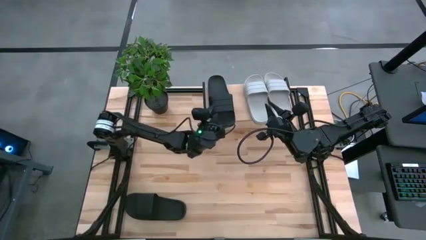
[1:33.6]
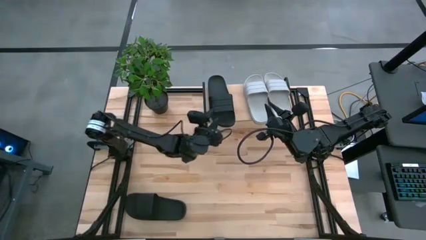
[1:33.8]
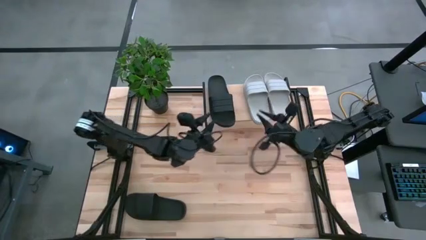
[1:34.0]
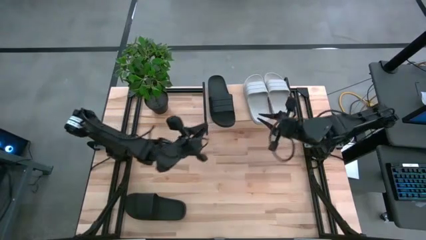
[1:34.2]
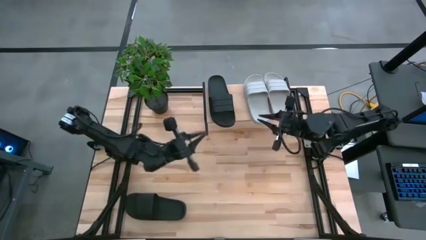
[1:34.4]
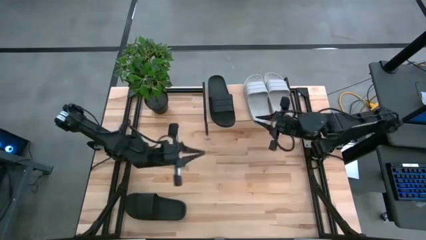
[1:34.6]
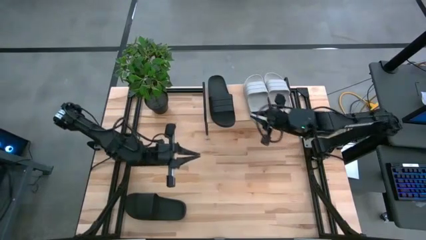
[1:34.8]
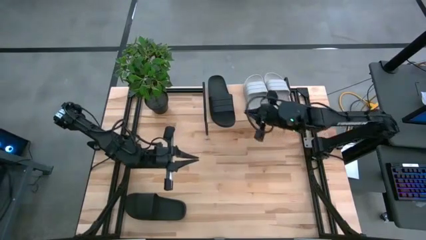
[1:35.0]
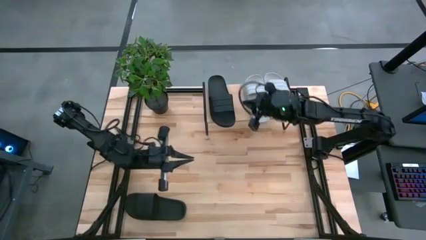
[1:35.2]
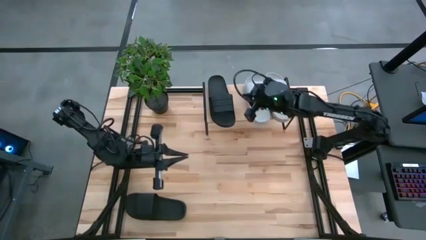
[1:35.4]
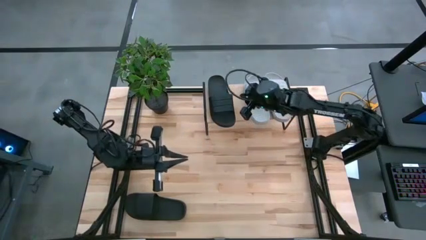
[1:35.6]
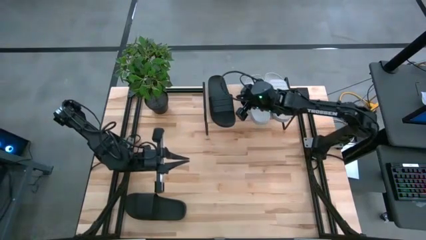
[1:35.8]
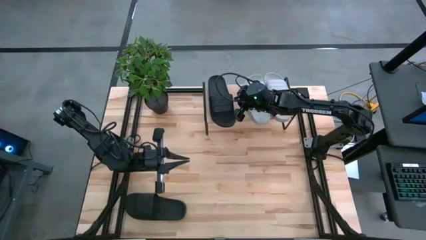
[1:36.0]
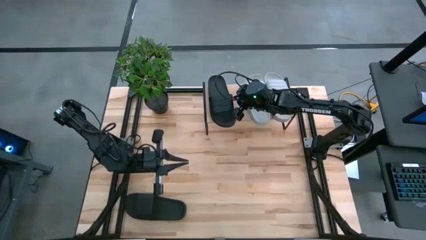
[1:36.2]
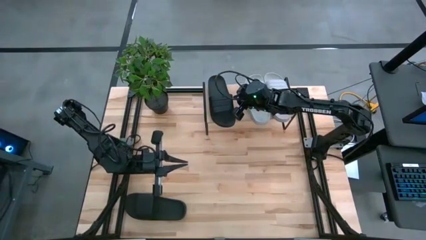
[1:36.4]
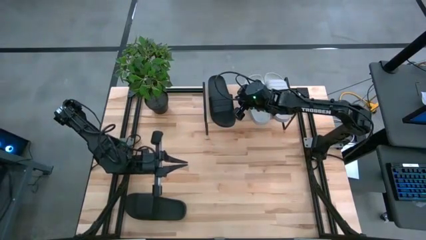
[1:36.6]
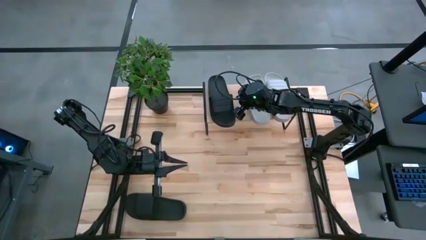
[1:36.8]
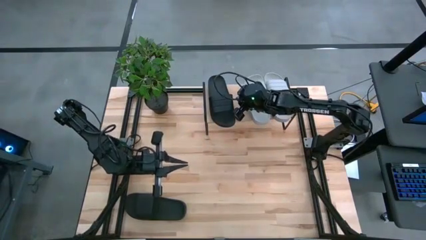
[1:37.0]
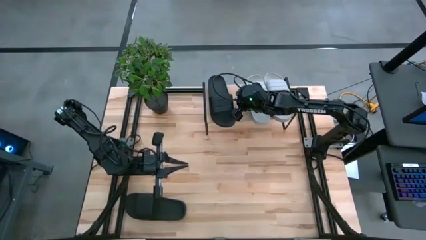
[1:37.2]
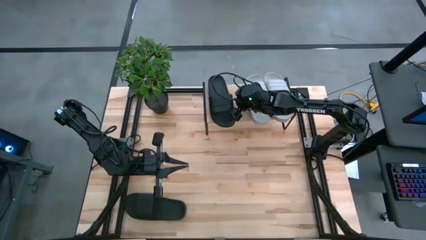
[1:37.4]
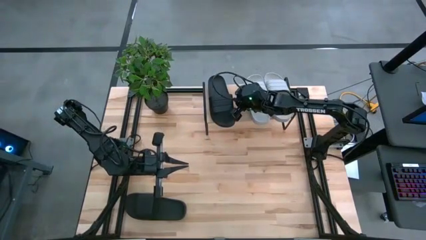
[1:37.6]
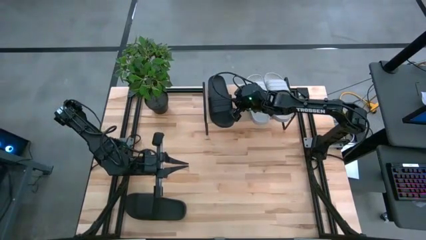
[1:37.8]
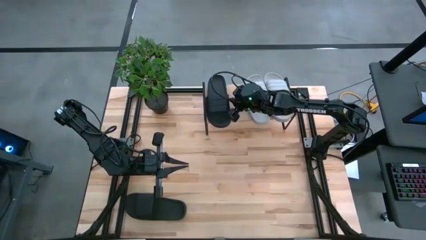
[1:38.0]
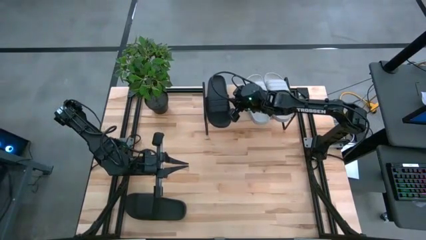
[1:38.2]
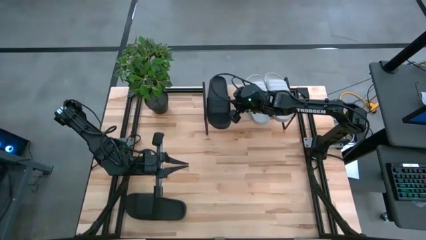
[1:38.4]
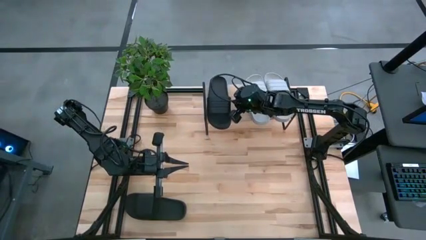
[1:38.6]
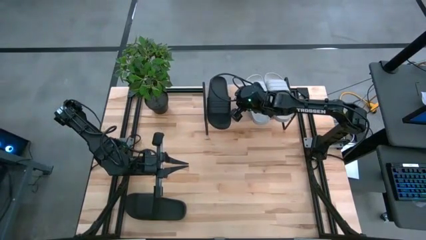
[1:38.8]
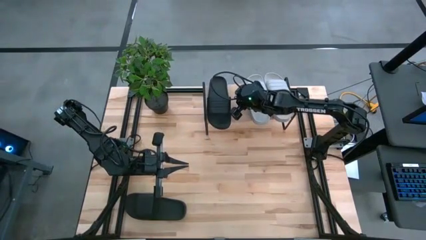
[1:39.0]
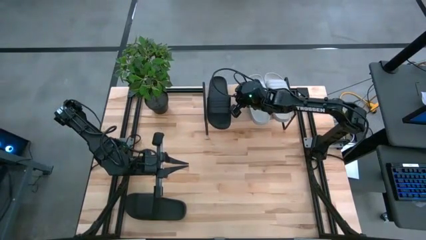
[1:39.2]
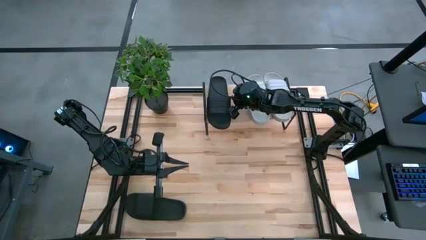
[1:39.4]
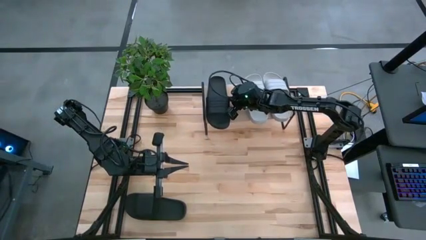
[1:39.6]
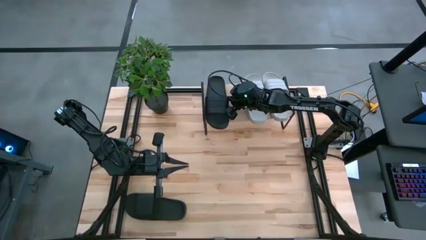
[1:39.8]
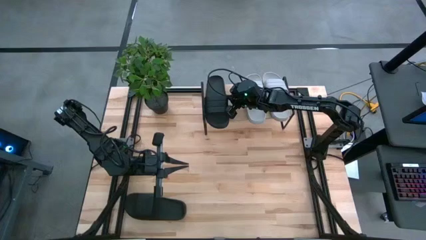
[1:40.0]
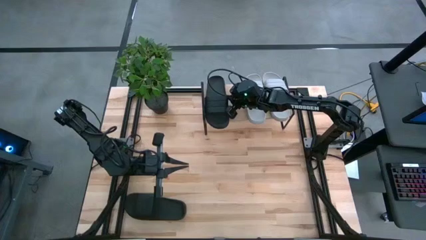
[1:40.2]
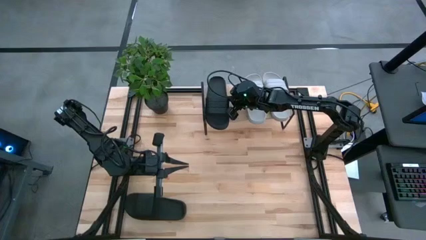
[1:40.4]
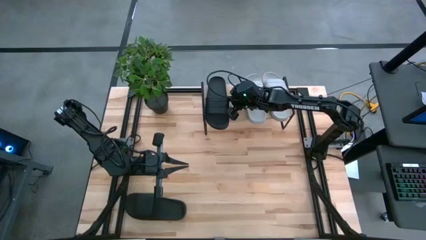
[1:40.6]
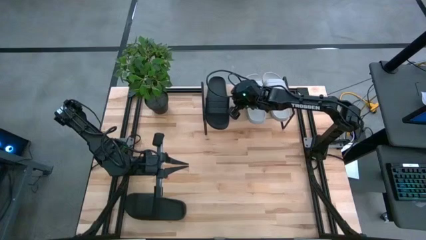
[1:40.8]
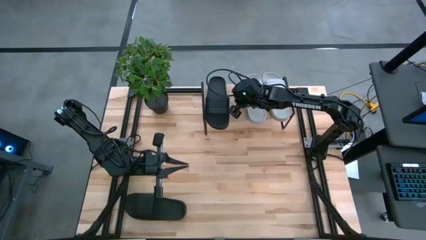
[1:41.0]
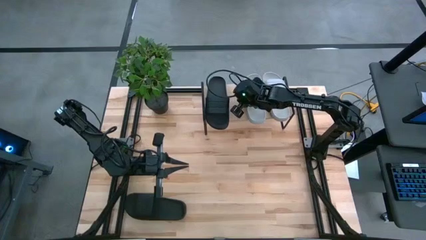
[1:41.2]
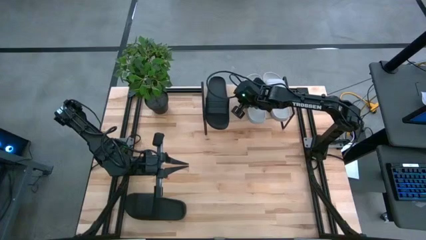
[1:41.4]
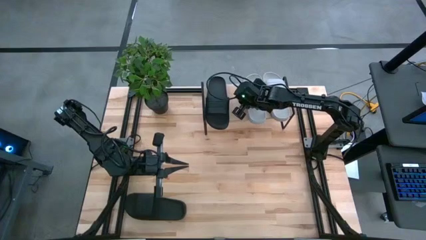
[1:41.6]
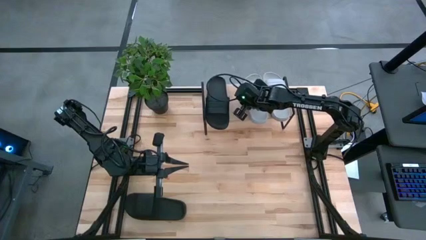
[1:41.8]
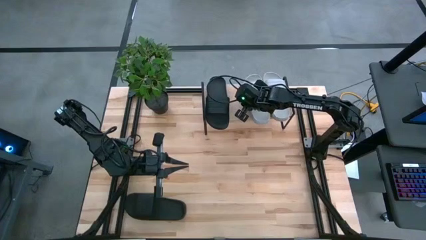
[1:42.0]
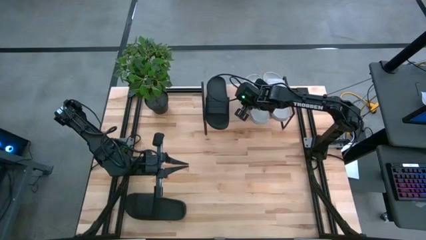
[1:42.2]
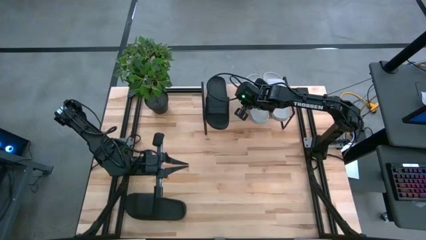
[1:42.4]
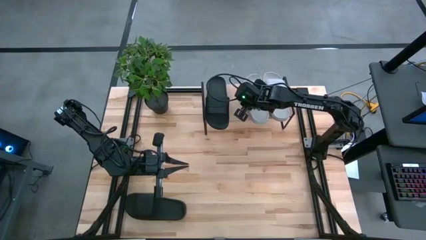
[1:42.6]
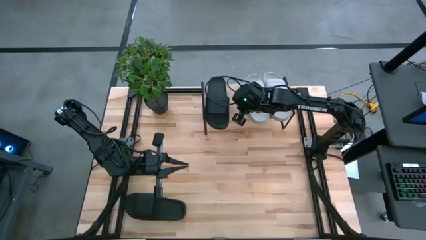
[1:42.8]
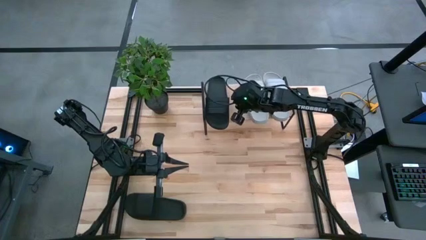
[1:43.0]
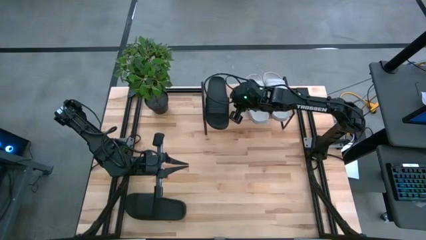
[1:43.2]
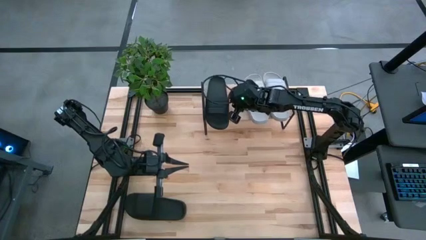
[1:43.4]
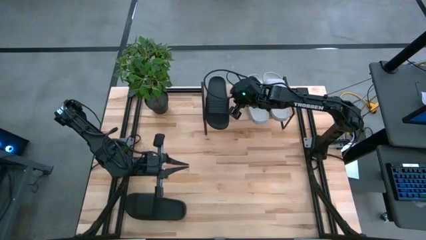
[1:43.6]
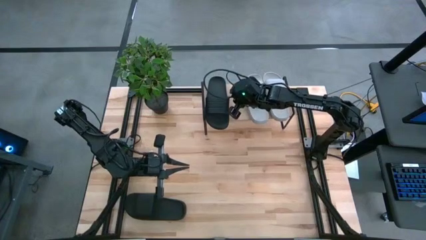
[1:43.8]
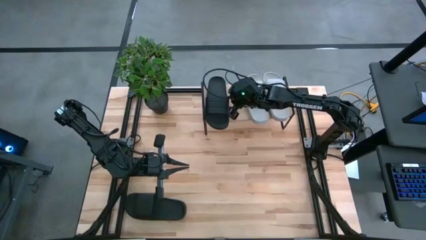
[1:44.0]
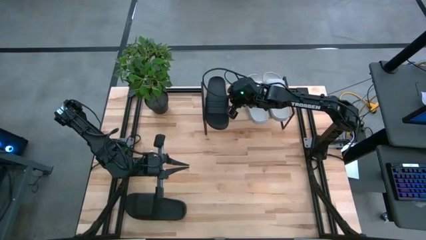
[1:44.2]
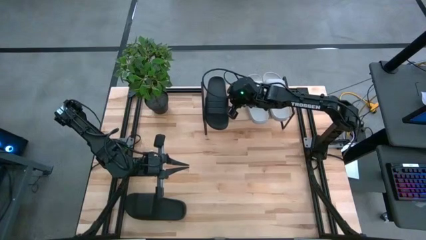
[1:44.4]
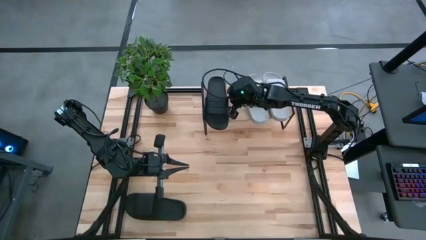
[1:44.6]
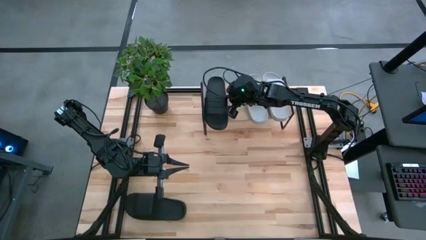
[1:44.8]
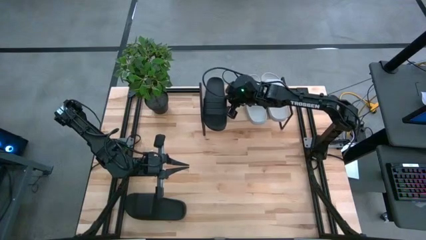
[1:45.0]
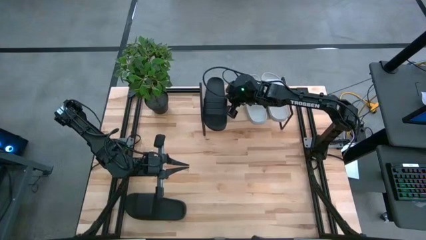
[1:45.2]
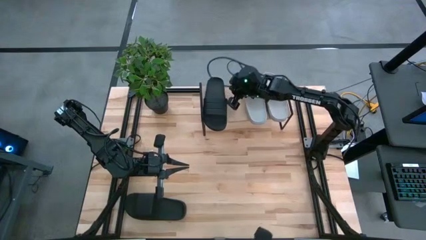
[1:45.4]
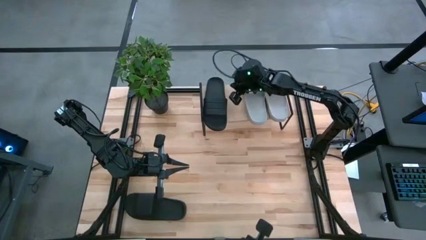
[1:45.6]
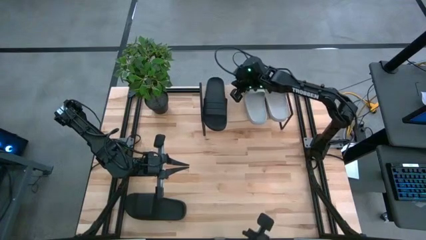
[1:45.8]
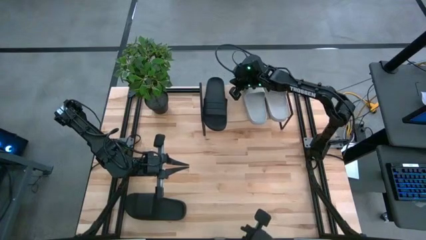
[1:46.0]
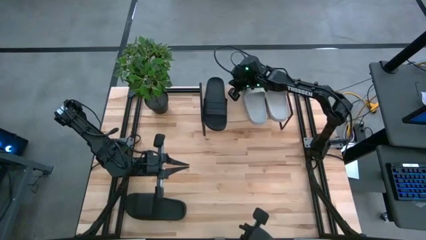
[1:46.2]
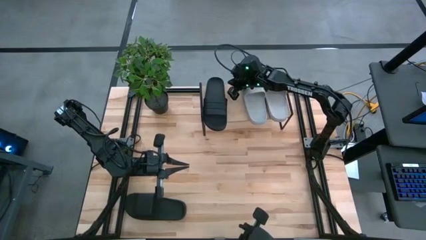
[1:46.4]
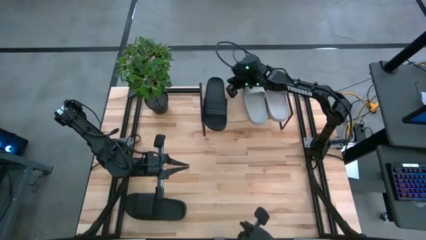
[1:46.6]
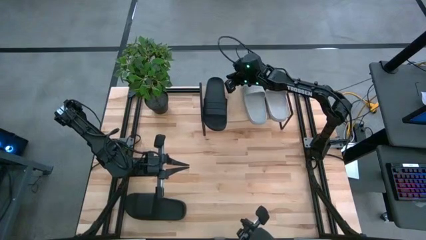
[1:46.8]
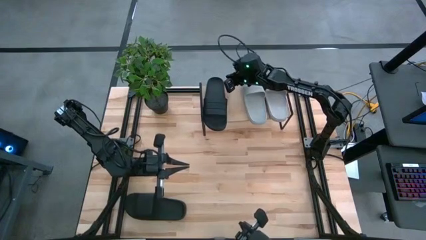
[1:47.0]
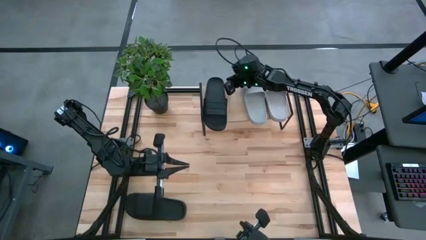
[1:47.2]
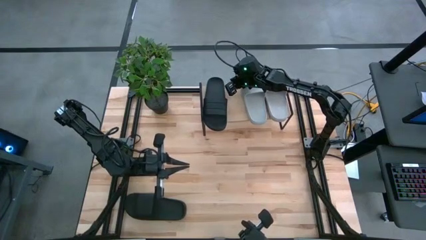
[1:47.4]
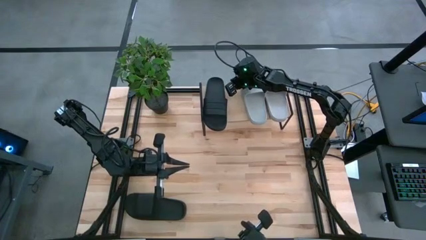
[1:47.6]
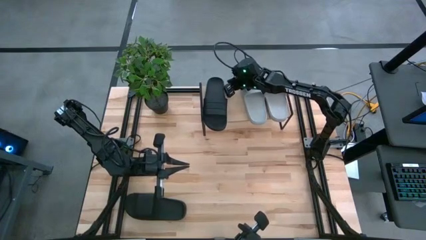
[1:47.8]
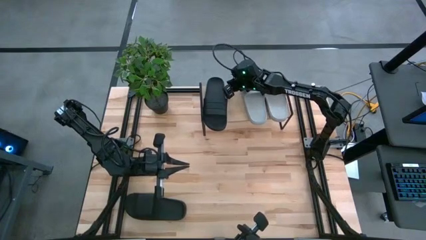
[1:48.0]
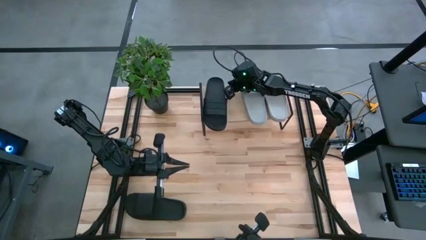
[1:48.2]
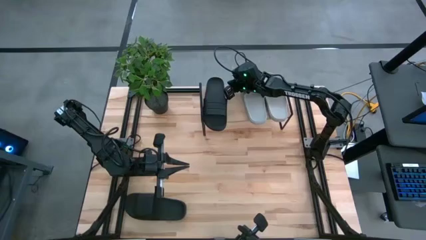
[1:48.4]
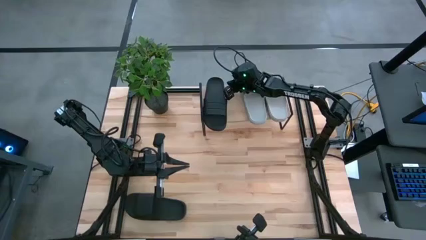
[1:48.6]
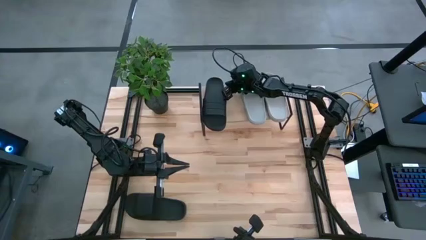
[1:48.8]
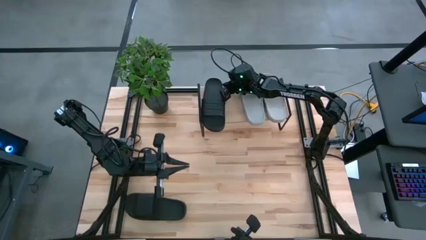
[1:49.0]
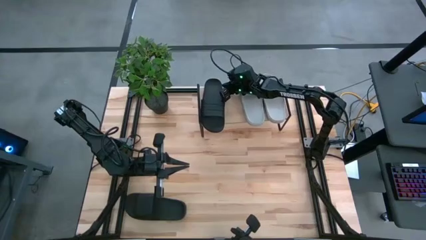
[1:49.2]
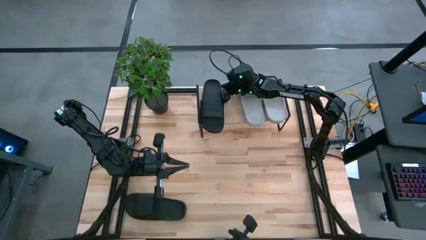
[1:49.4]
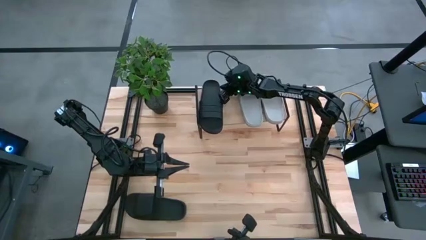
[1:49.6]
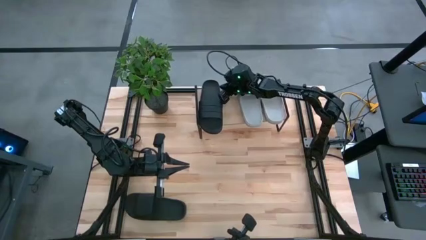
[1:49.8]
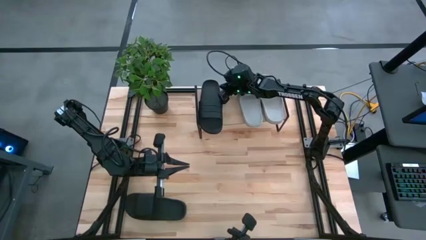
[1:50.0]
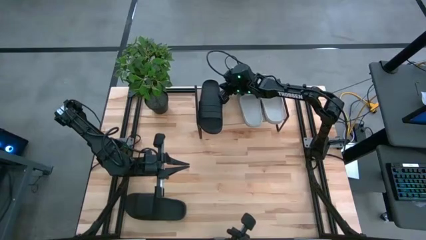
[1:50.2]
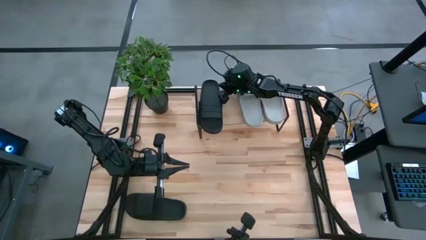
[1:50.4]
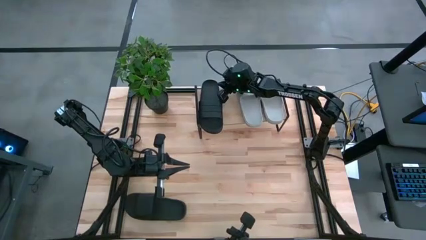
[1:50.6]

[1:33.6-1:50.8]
Task: Pick and place slides into the shelf
Adjust the slides on the shelf
